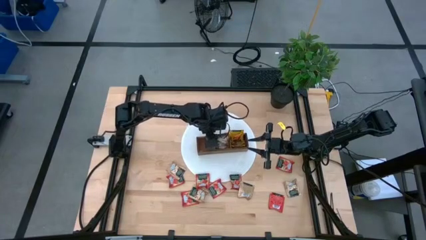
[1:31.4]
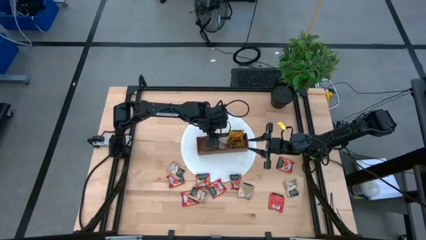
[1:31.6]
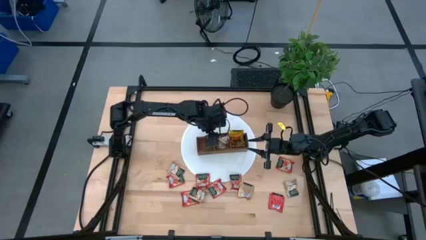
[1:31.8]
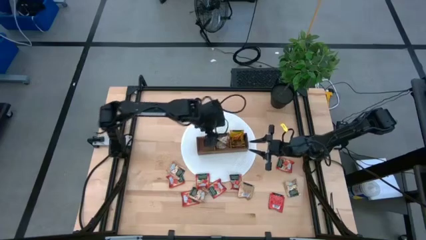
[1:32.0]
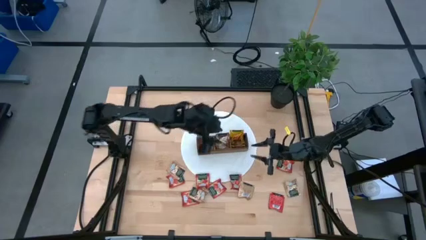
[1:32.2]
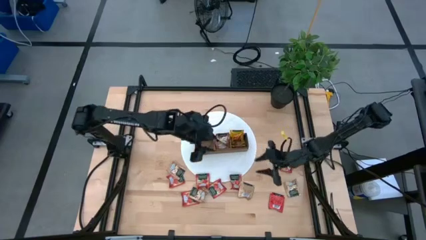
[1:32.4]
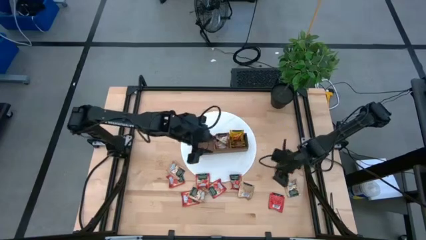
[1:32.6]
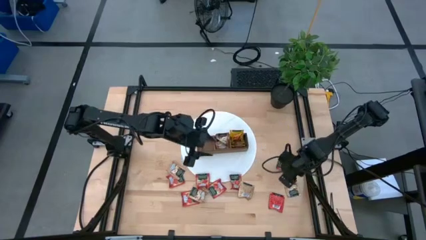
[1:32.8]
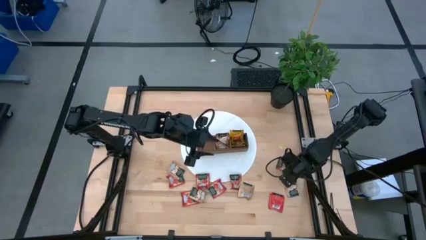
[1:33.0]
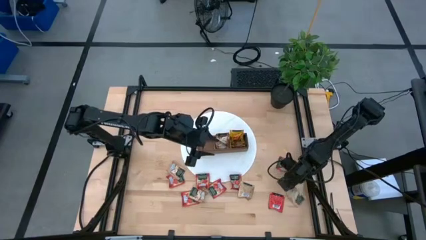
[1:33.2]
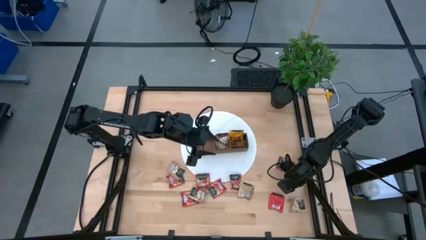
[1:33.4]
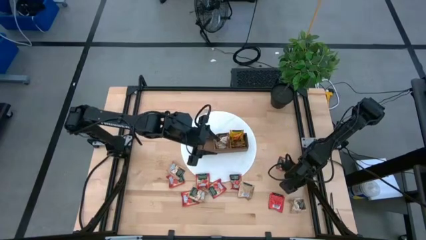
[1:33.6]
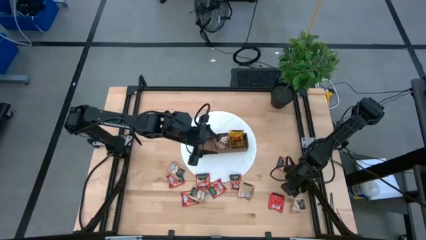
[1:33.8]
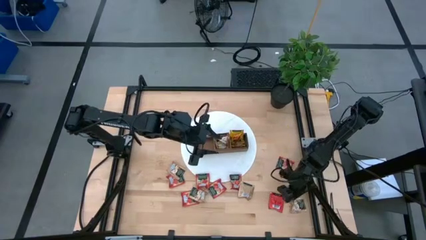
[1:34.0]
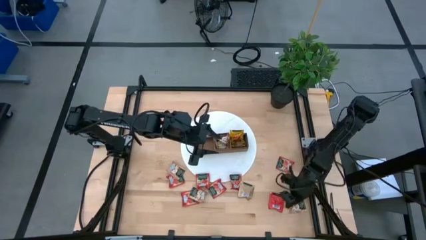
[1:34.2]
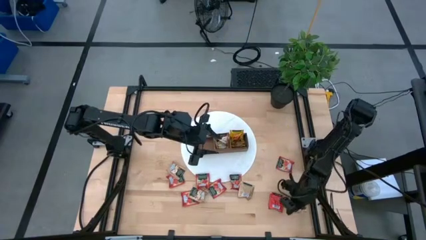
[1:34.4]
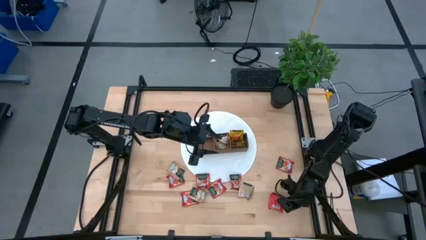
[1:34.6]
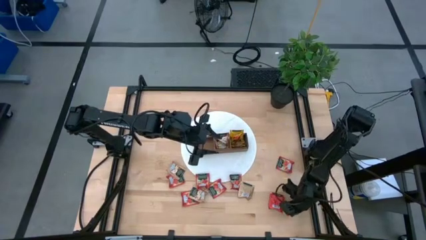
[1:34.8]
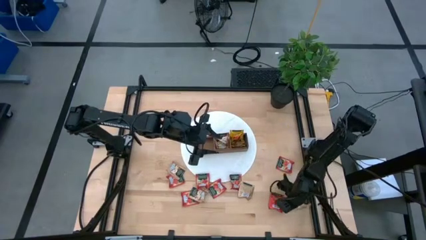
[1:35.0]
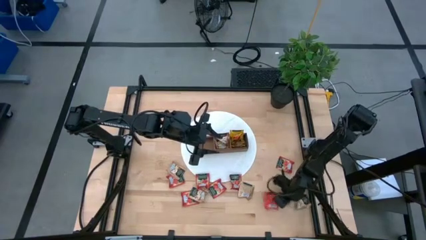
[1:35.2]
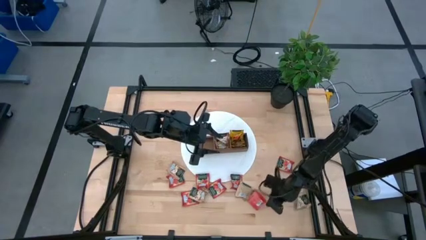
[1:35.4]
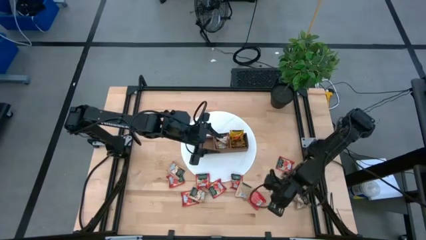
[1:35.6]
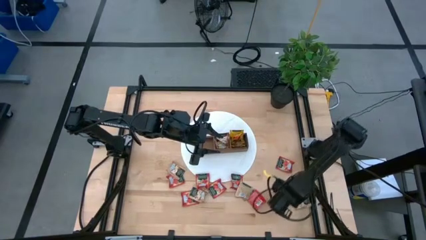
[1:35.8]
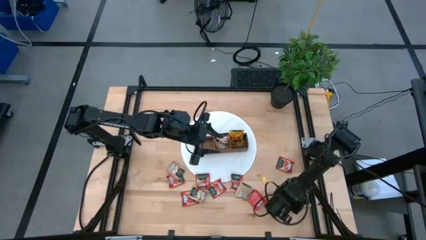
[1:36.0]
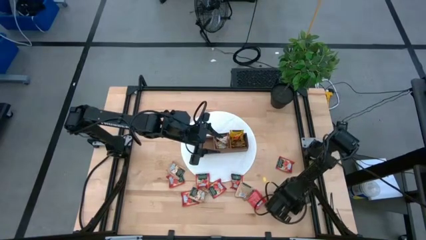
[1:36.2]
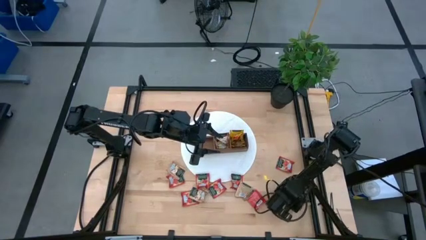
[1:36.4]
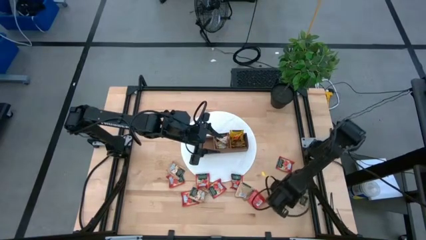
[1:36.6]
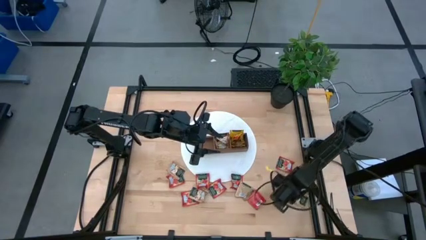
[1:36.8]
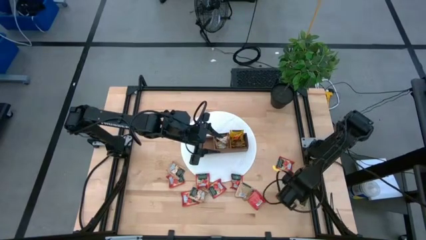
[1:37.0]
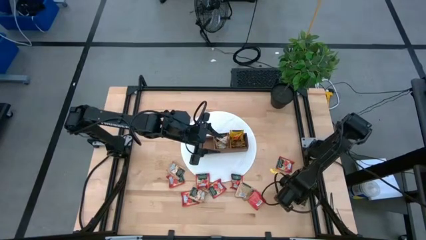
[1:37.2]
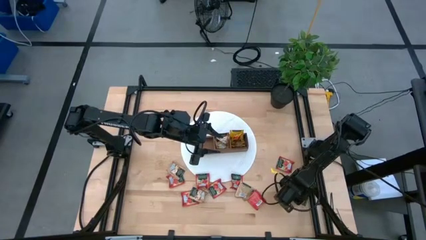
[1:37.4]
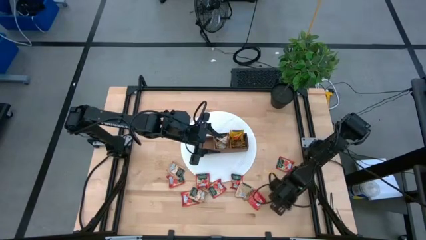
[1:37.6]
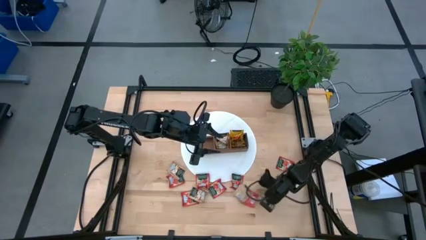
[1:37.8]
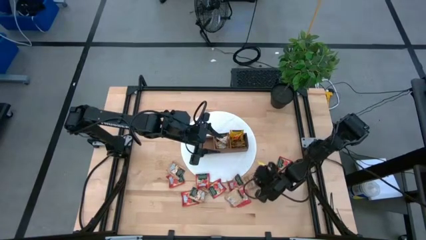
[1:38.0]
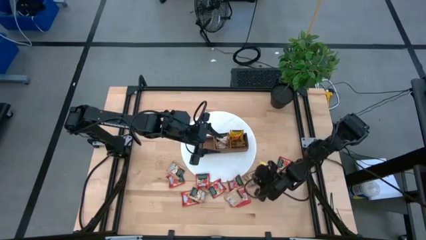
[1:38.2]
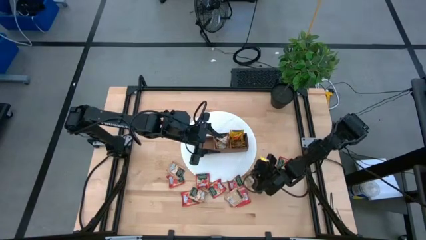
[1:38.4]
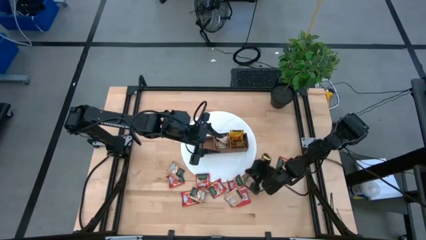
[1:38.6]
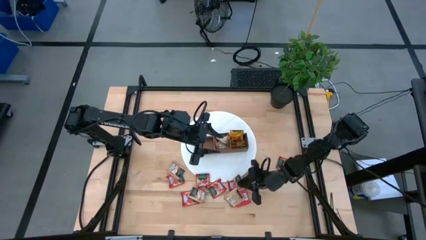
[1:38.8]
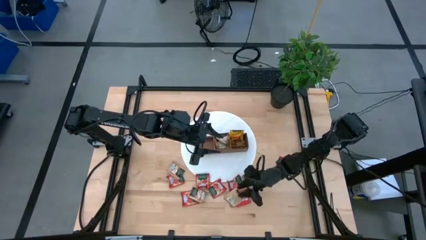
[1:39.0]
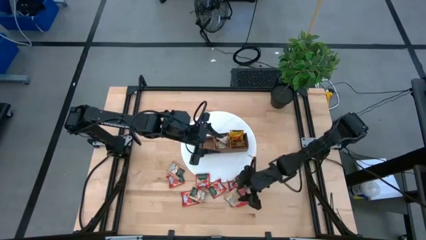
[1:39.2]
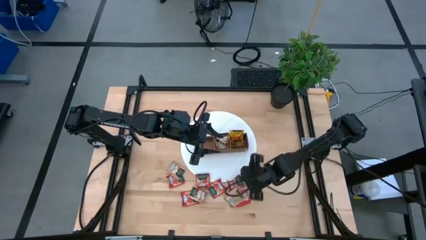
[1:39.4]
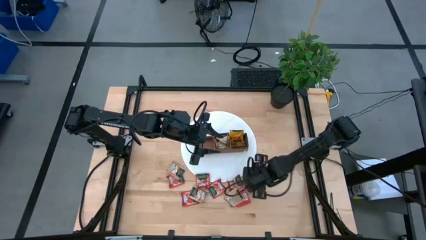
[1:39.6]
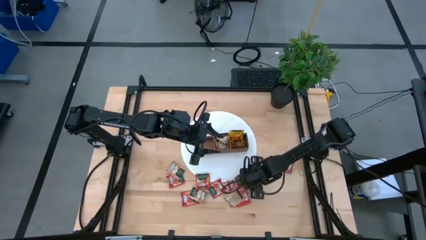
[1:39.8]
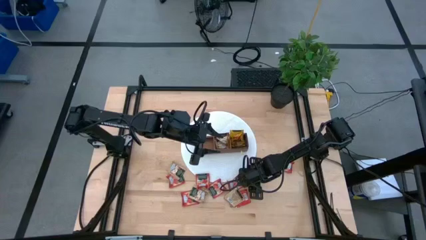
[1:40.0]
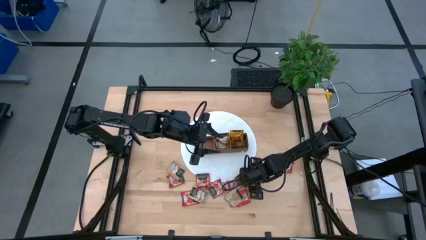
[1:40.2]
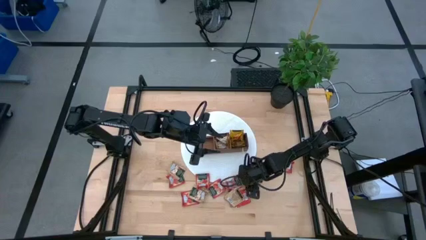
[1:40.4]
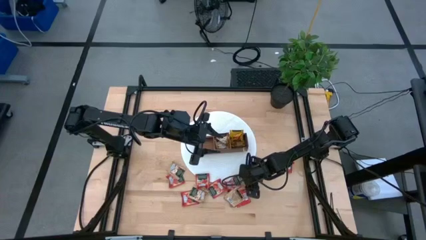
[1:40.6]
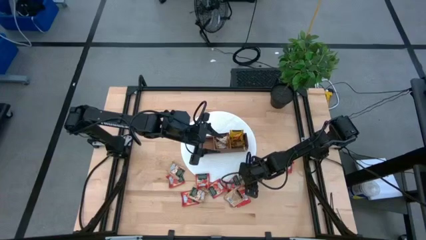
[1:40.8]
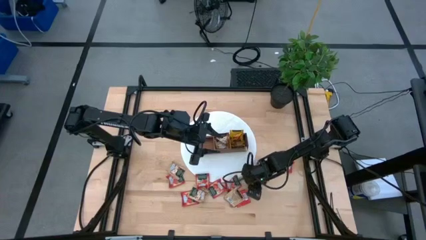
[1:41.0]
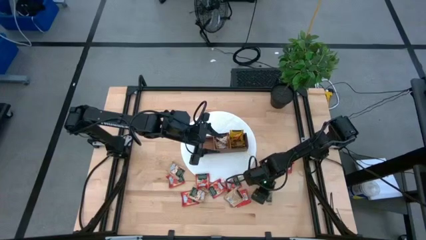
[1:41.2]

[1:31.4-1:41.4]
Task: Pick & Place Tea
Put the brown tea bag into the middle section of the wooden organizer

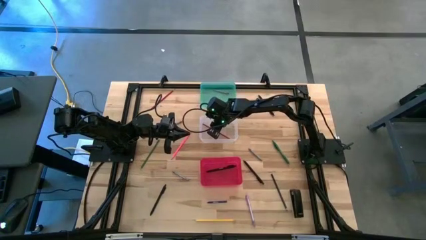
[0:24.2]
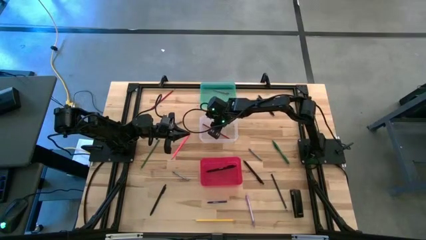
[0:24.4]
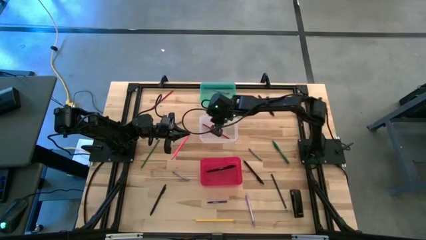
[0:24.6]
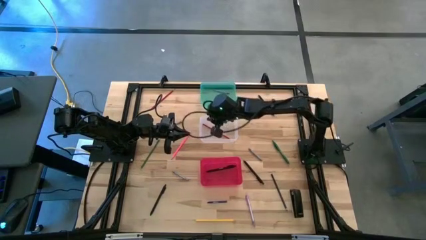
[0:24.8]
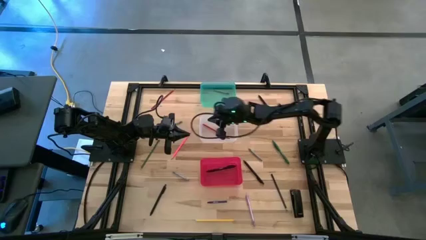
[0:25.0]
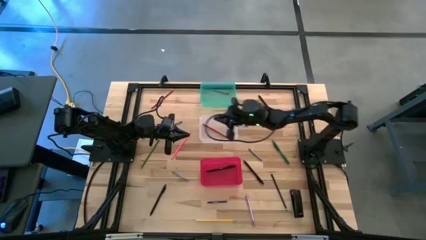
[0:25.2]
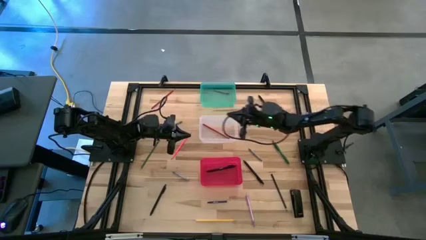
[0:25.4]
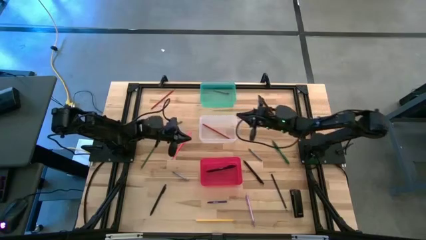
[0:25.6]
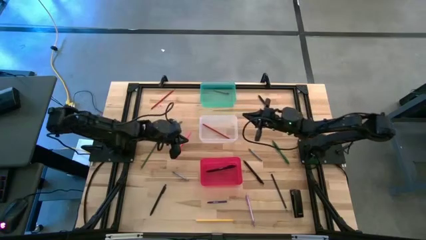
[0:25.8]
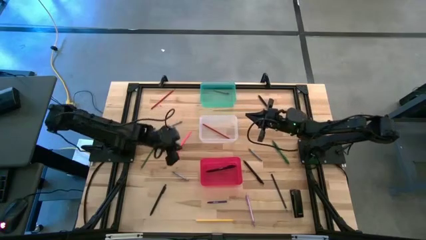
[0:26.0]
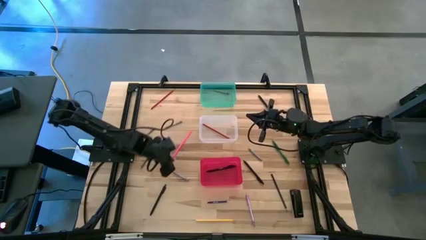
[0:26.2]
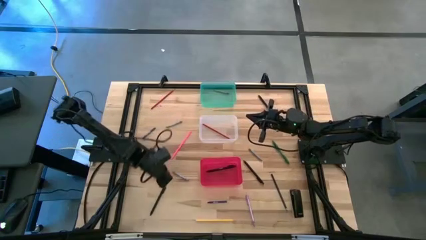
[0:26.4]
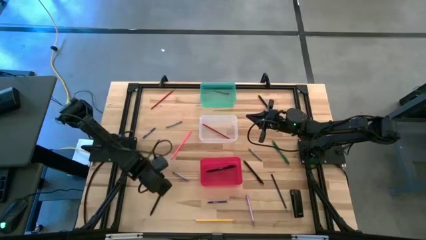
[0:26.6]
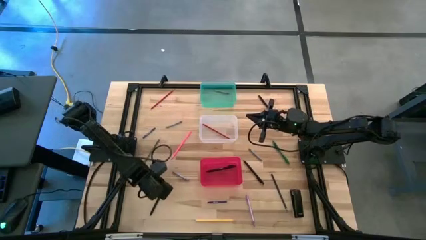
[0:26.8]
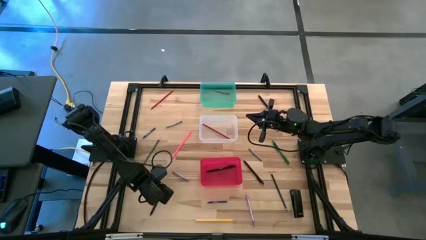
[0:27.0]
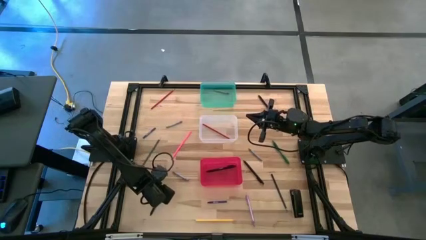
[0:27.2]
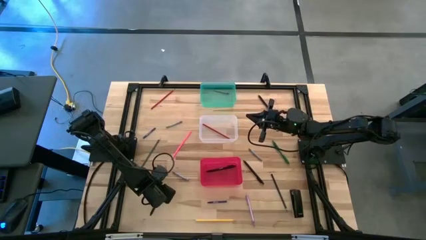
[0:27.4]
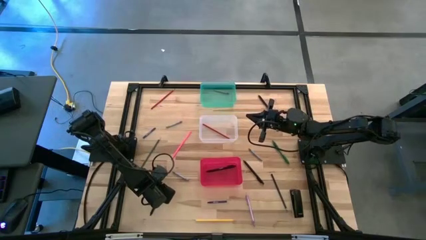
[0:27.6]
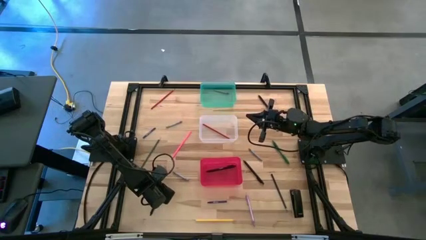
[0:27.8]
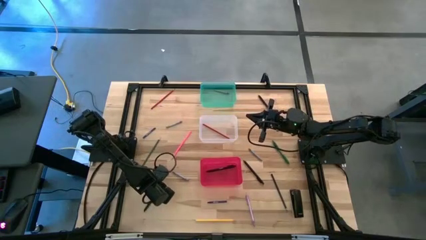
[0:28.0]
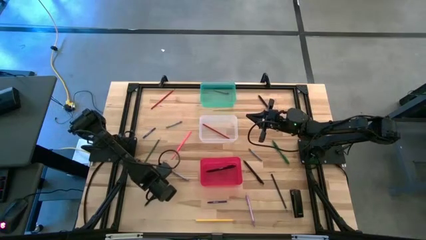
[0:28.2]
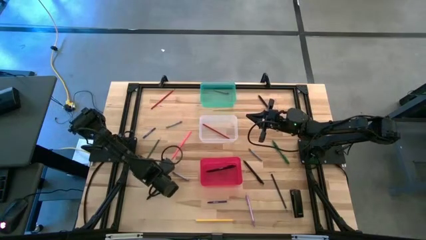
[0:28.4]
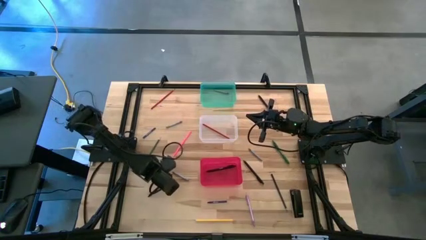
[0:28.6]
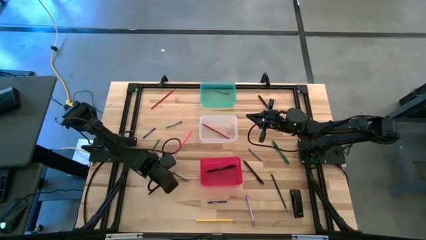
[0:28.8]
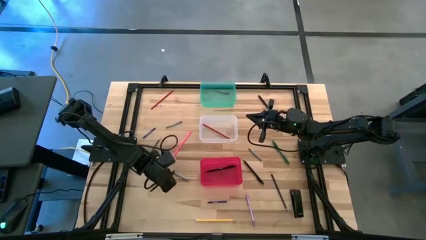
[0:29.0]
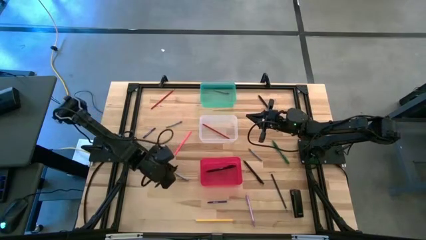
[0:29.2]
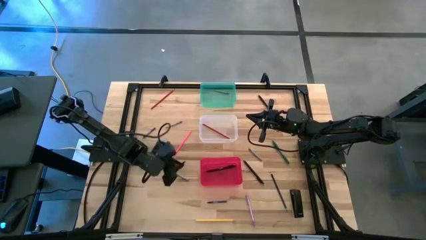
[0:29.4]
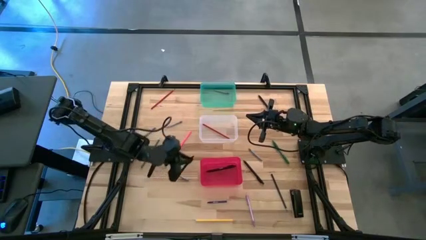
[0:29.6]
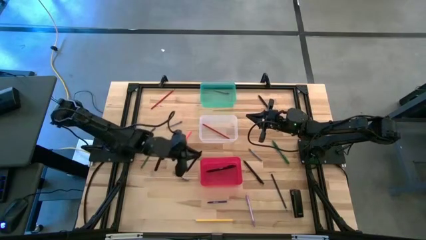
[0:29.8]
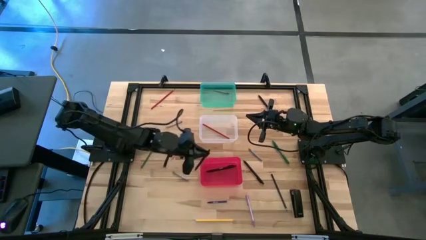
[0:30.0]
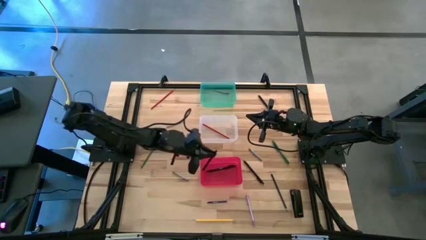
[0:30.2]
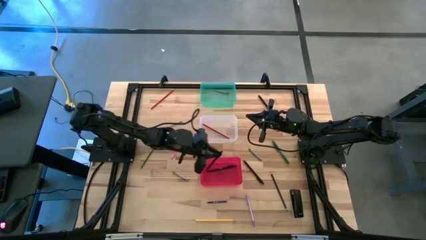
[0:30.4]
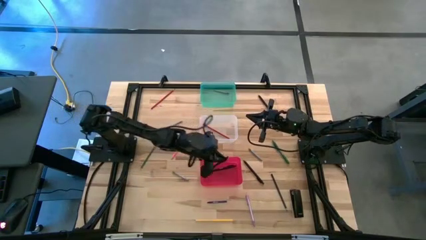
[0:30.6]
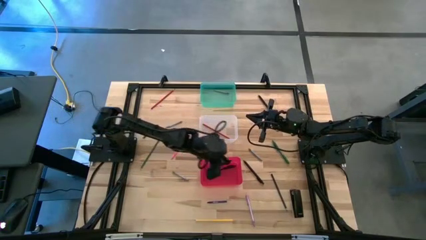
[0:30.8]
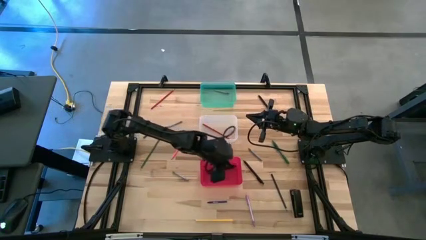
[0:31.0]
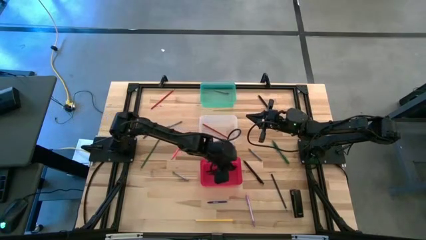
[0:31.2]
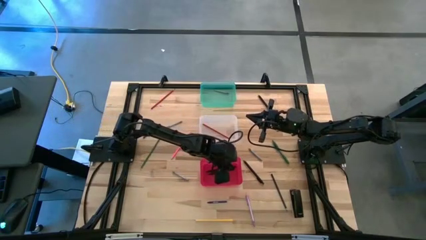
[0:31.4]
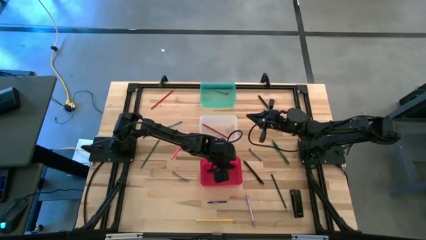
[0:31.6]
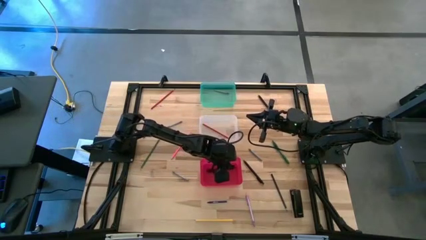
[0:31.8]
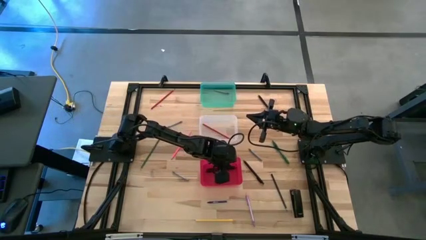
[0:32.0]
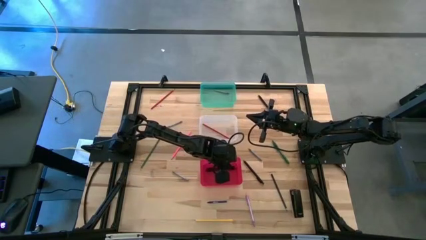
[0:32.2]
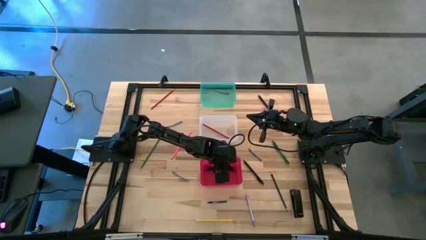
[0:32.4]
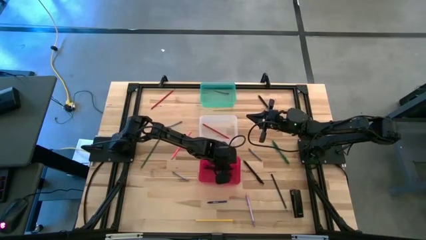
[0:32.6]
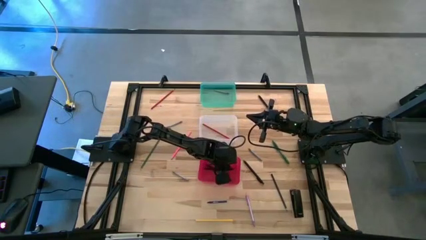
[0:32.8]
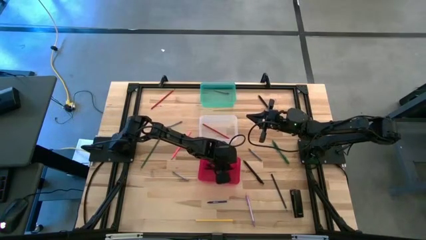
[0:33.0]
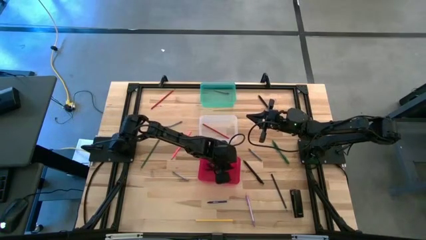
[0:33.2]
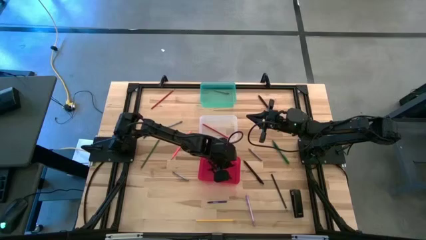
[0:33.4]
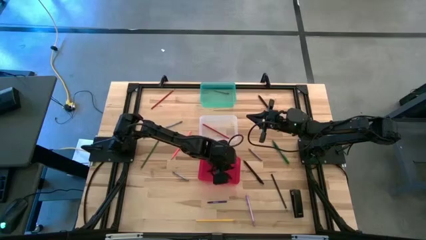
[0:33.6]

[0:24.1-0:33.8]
Task: Sort crayons/erasers/pens/pencils in bins
Put the left black pen into the red bin
